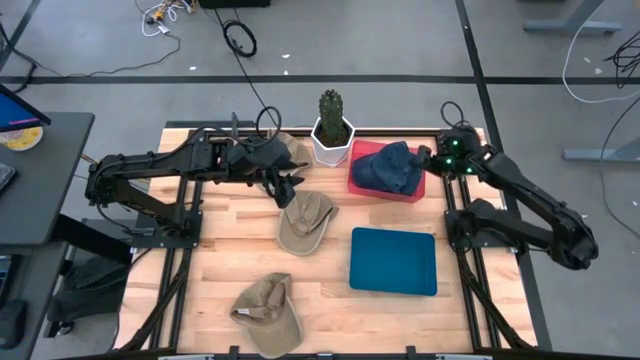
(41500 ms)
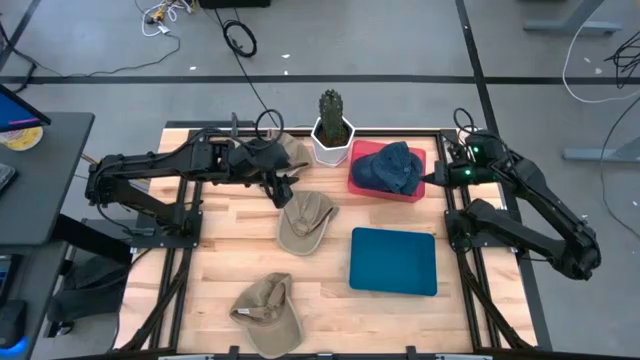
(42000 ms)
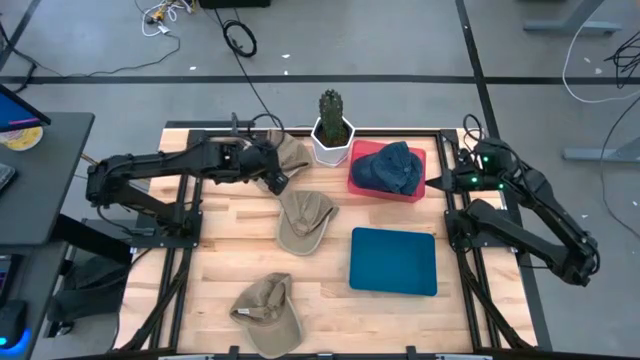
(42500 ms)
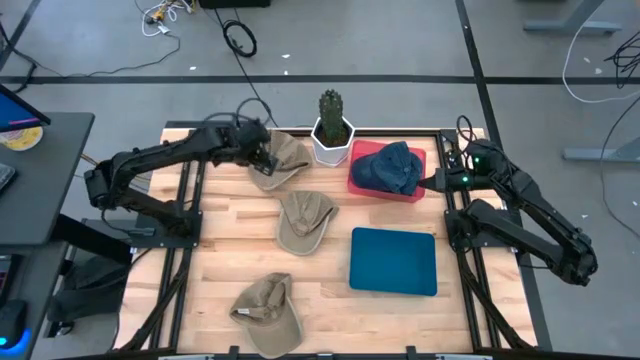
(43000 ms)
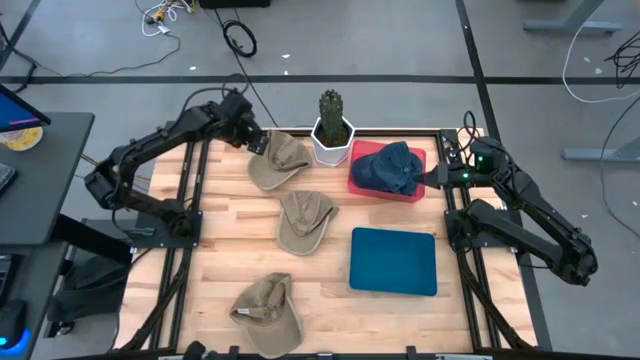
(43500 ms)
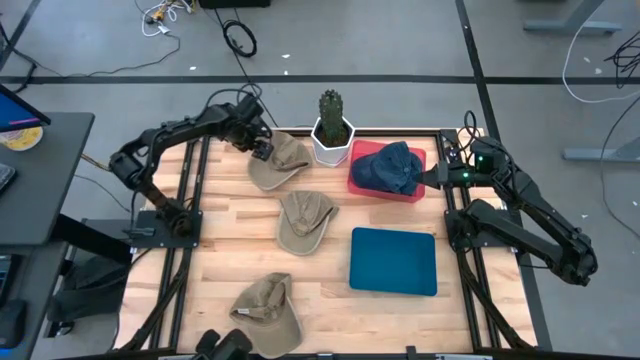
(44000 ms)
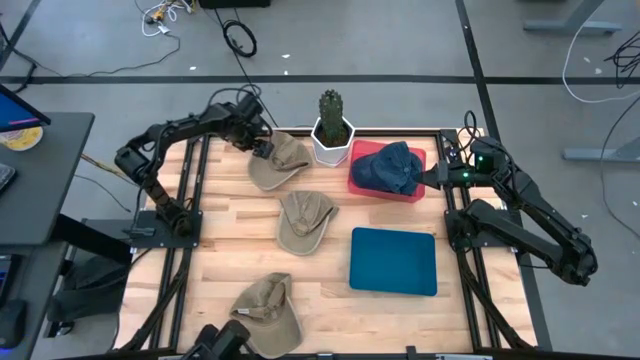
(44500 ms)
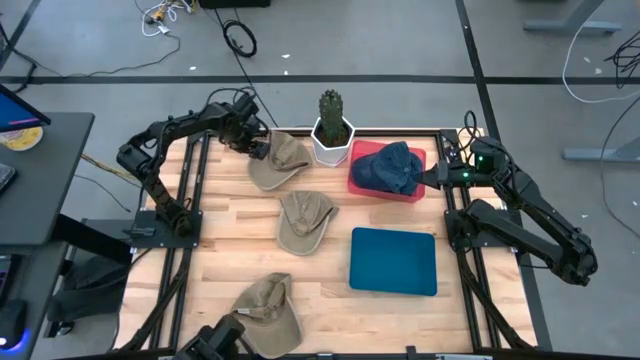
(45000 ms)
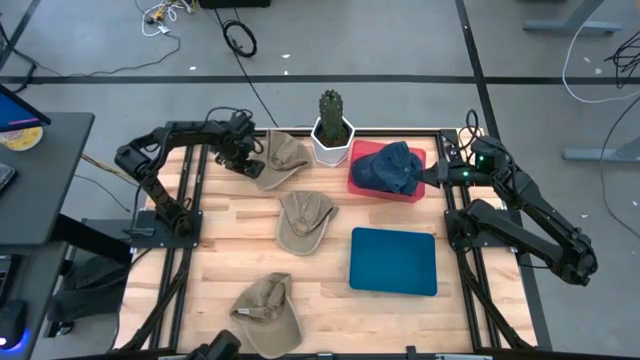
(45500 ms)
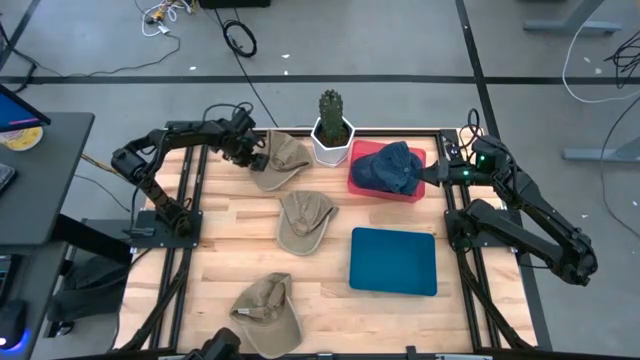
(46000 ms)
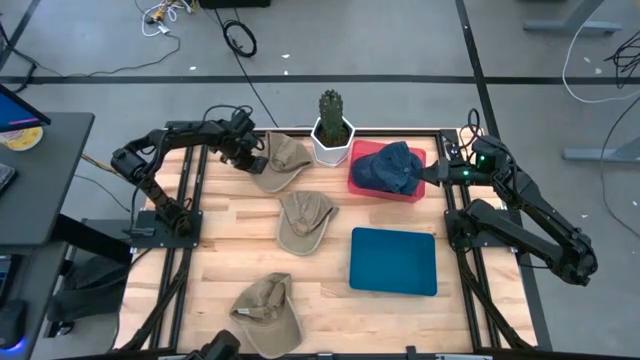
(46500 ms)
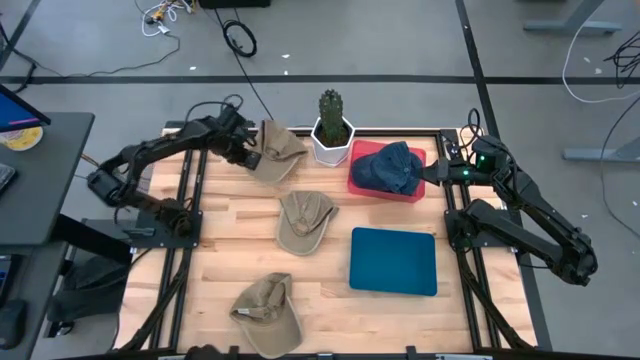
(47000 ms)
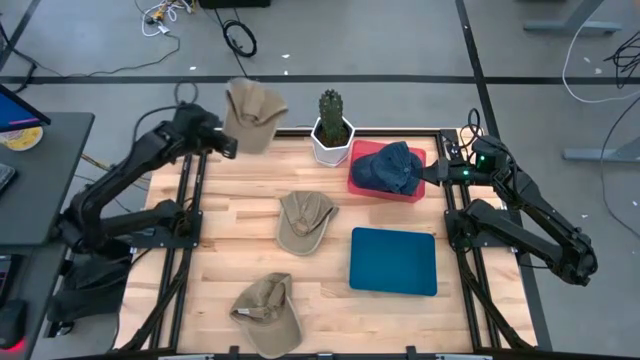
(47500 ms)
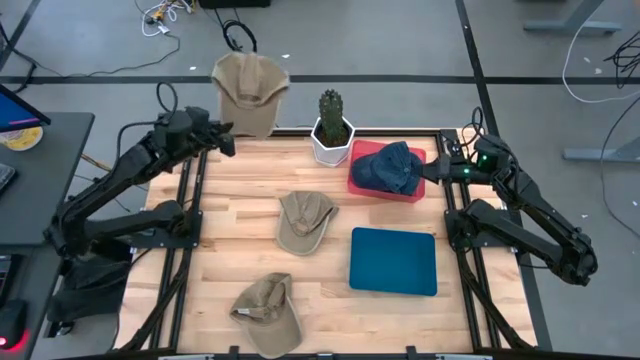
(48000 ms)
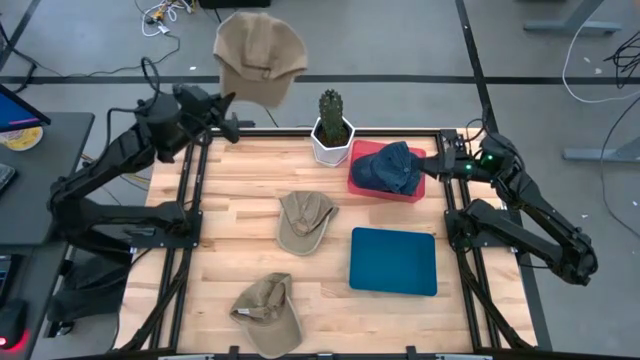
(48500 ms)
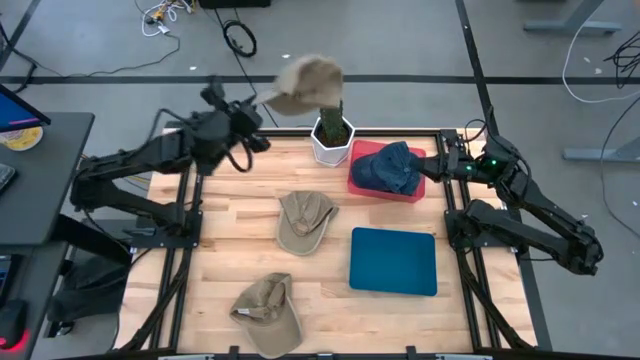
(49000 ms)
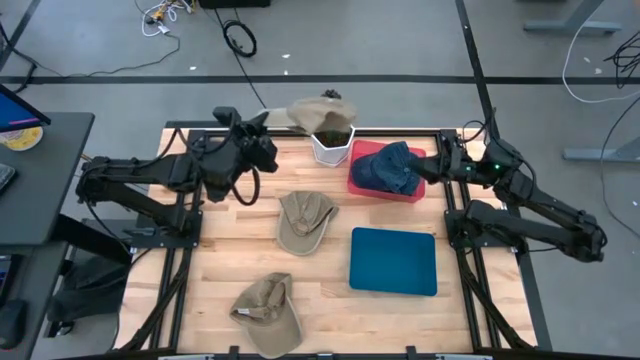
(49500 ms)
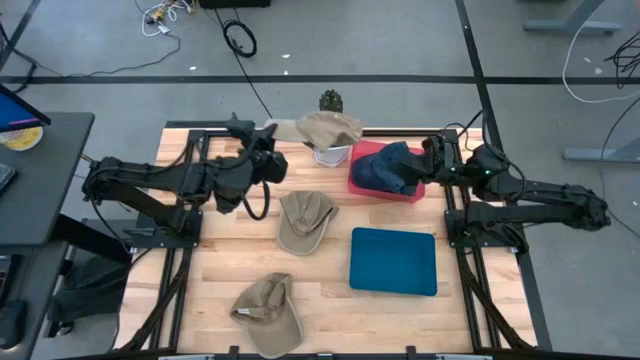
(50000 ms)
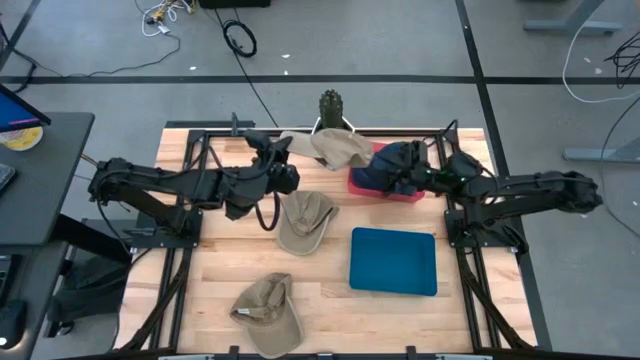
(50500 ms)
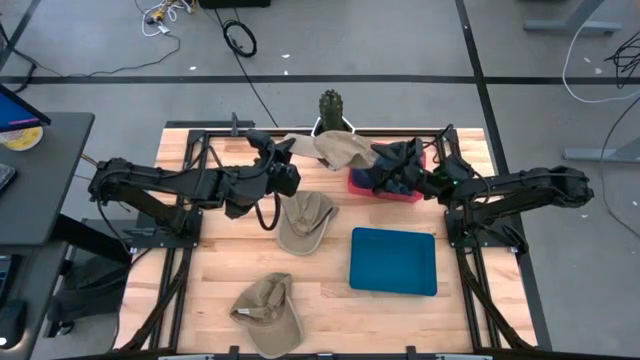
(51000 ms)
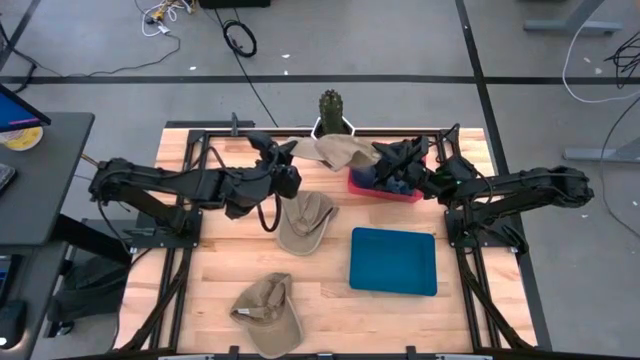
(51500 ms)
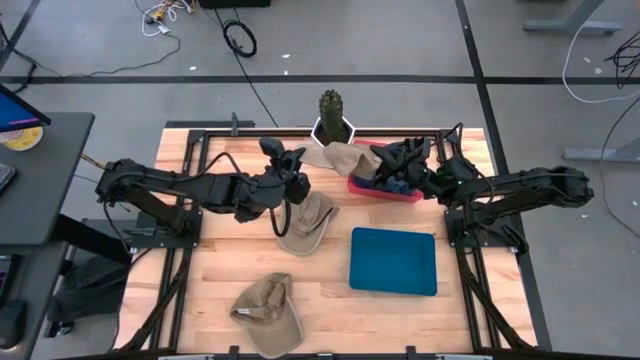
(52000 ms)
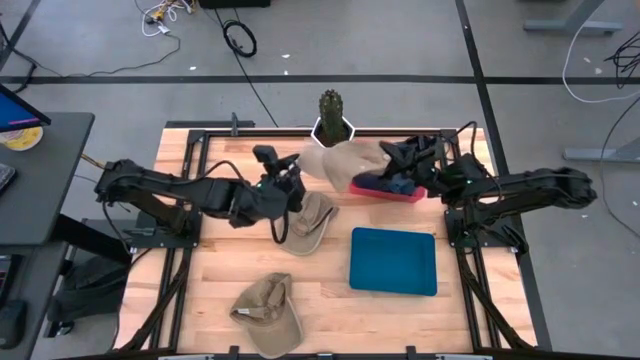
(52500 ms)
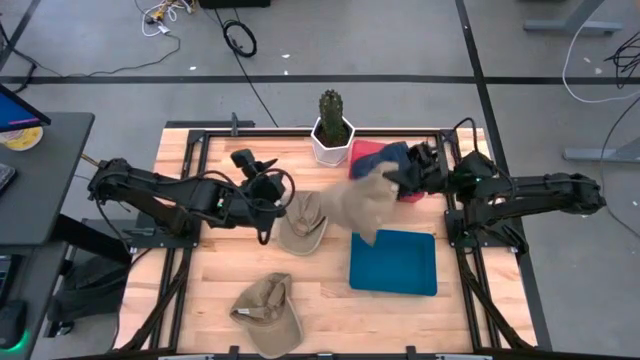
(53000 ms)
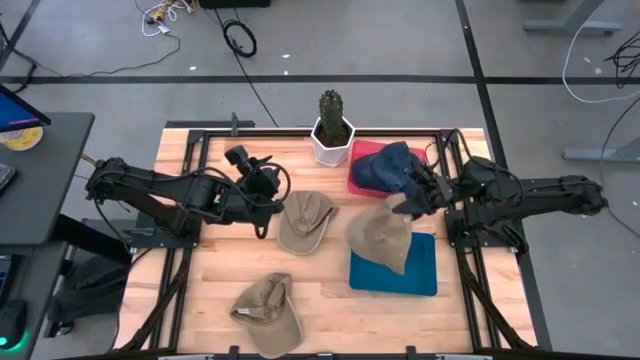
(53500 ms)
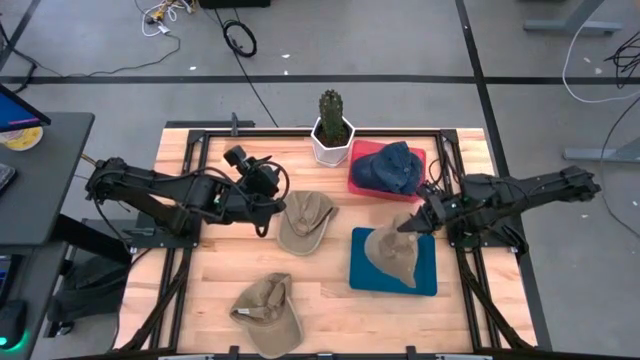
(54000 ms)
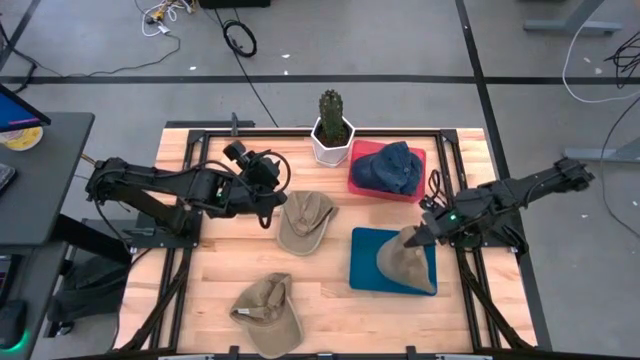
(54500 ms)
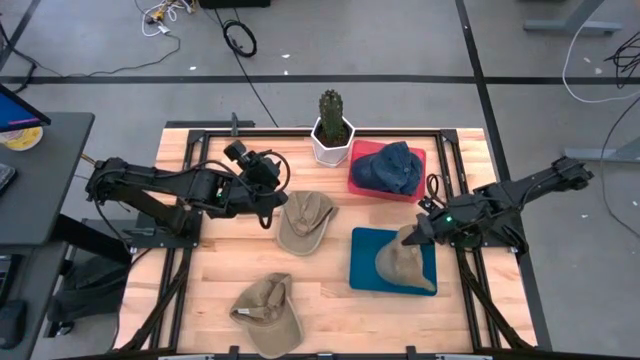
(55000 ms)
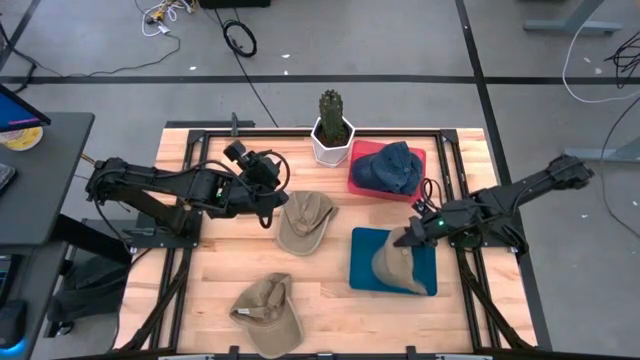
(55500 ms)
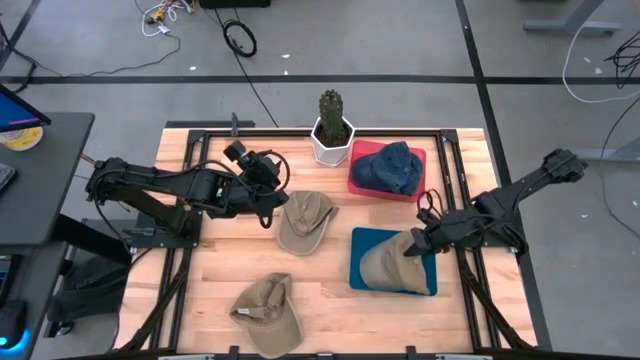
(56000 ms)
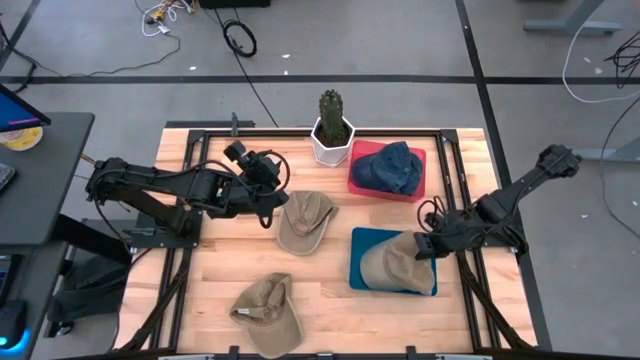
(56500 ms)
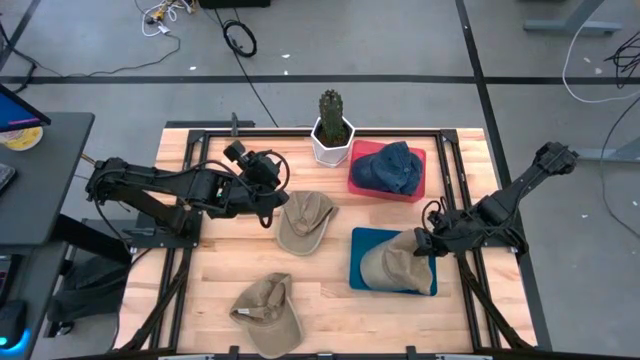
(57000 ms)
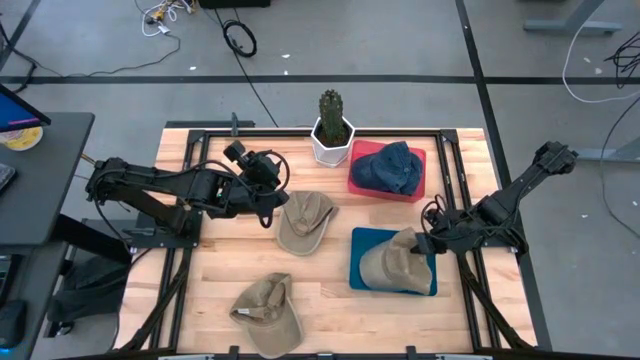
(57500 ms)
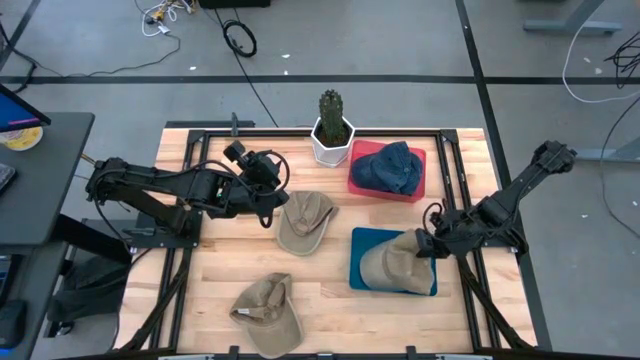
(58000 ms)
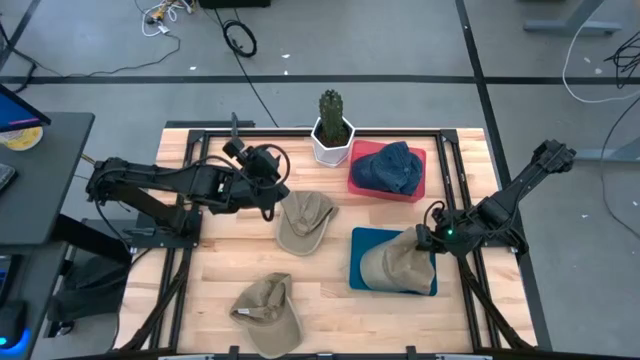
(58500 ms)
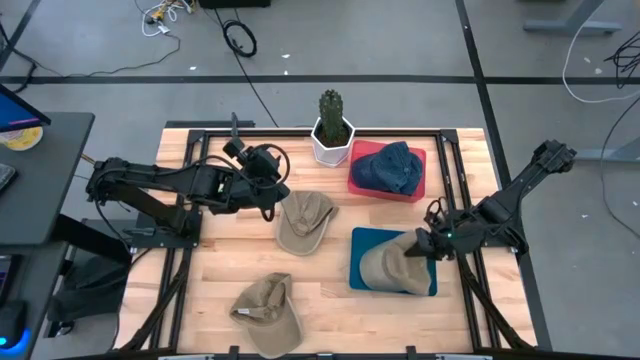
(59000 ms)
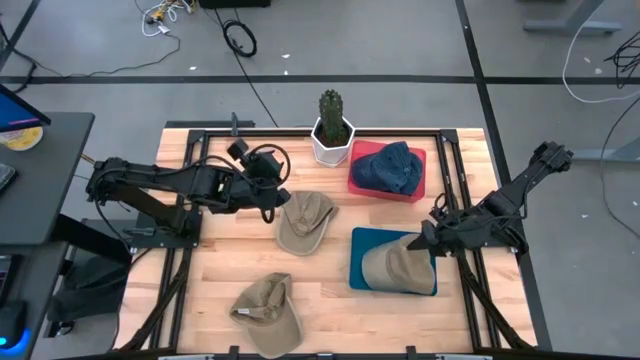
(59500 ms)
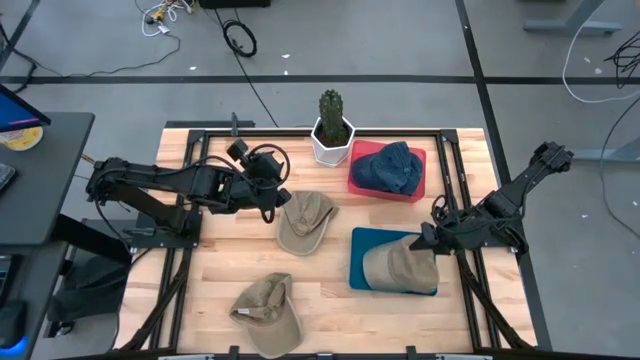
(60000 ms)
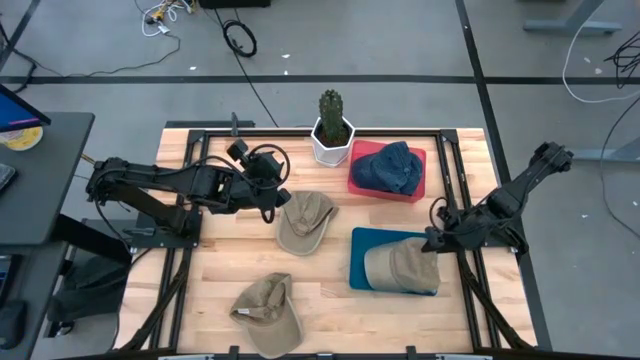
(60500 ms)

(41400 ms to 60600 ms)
Task: Pick & Place hat
Put the top brown cap into the blue bin

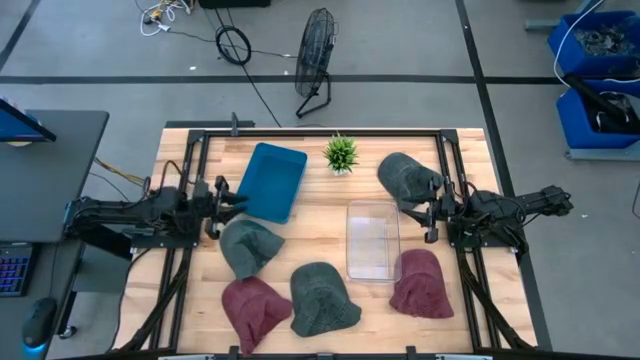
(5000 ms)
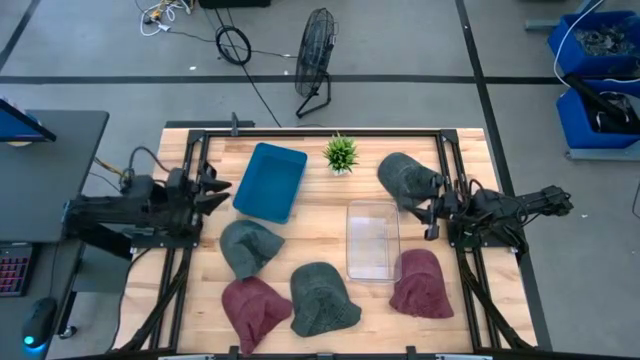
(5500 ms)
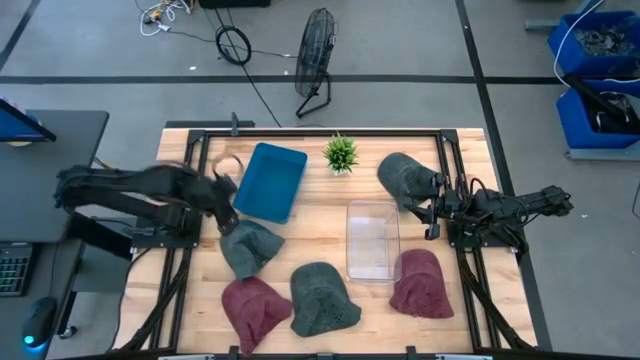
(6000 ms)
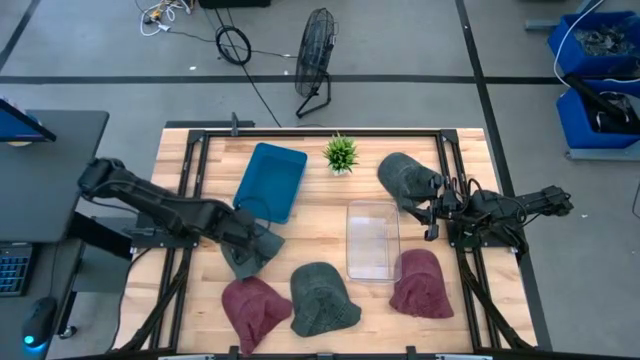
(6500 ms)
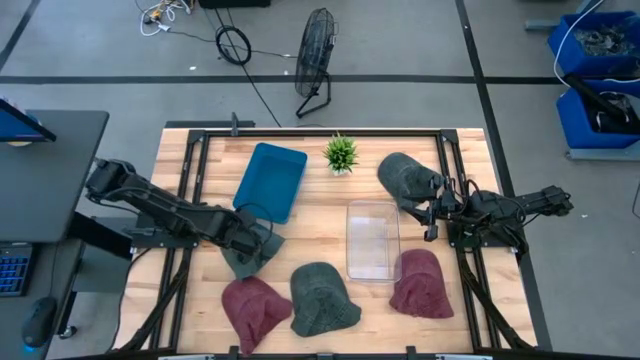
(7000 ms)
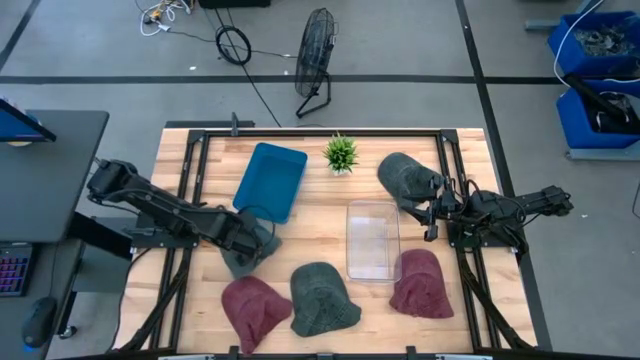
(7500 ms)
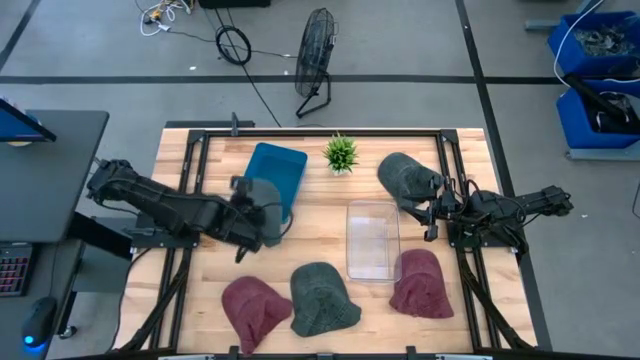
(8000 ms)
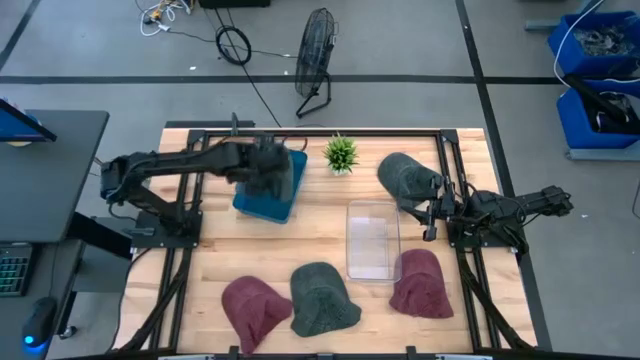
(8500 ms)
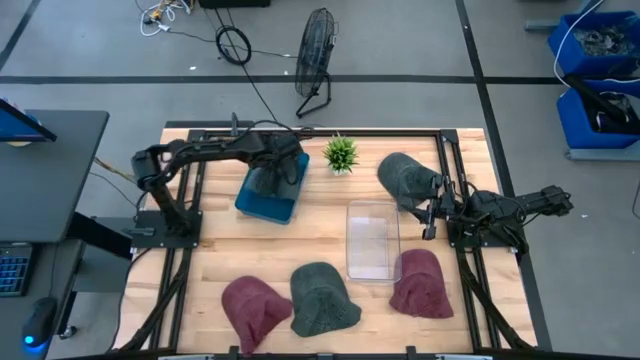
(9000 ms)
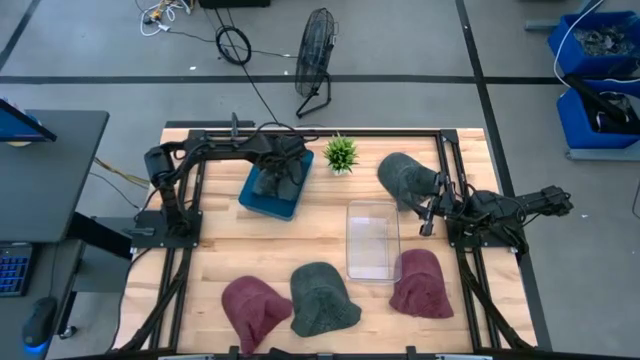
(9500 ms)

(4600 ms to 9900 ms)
Task: Pick & Place hat
Put the left black cap into the blue bin
